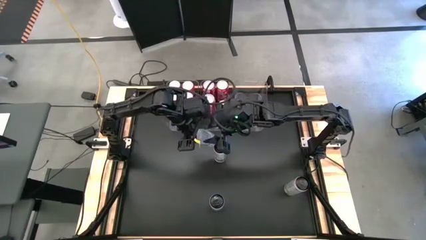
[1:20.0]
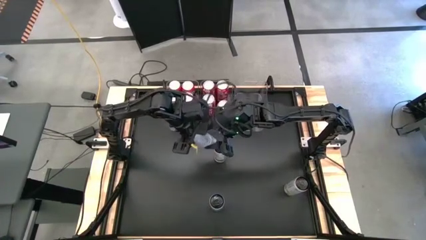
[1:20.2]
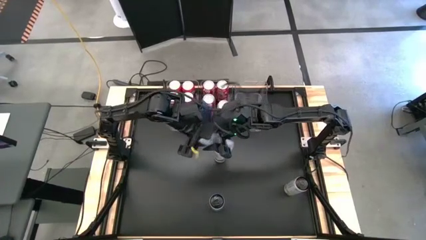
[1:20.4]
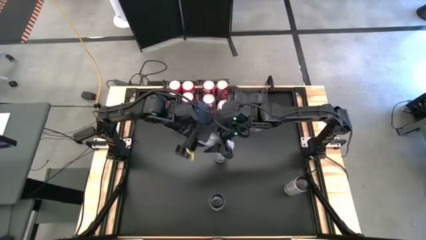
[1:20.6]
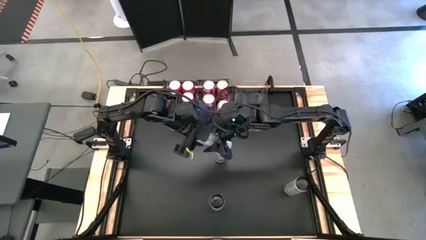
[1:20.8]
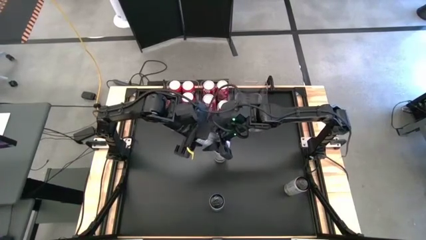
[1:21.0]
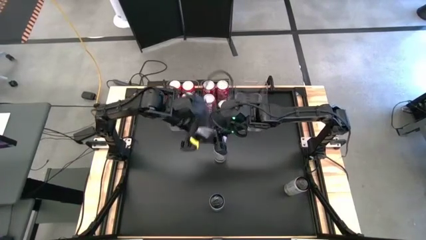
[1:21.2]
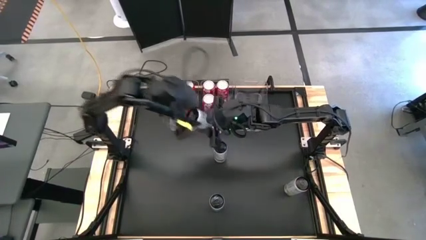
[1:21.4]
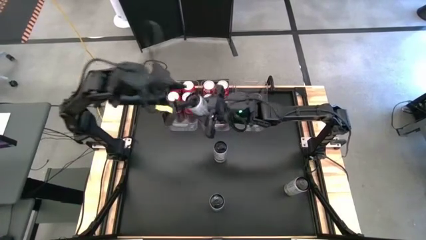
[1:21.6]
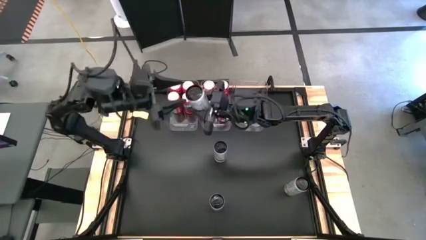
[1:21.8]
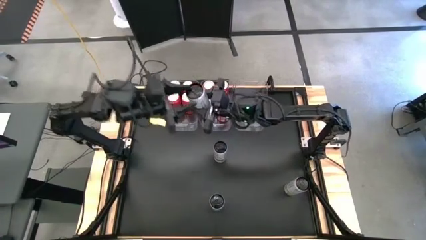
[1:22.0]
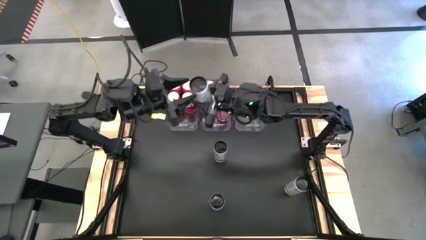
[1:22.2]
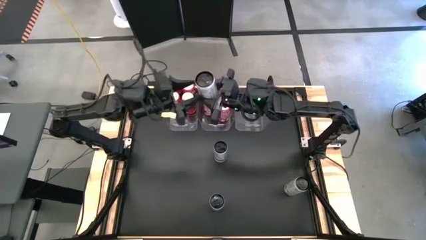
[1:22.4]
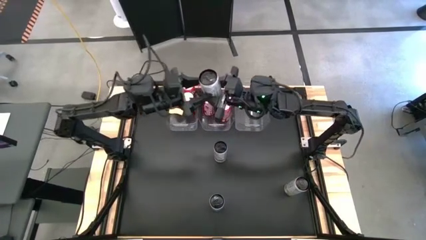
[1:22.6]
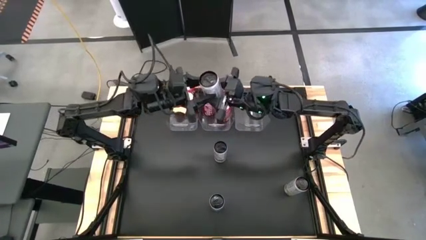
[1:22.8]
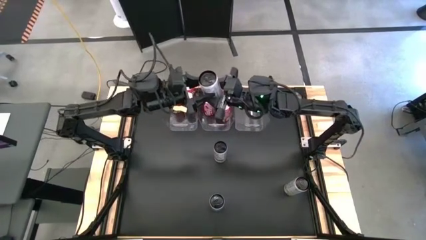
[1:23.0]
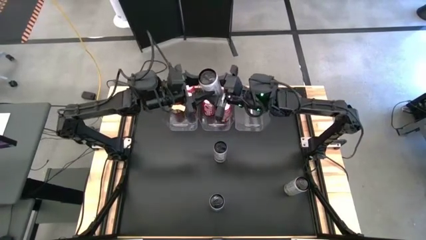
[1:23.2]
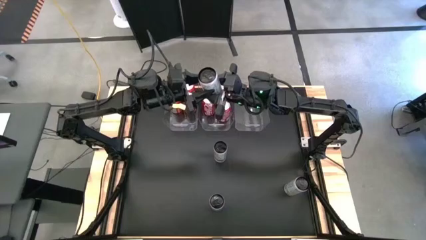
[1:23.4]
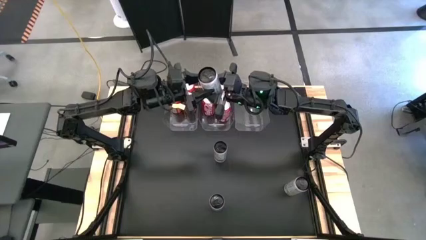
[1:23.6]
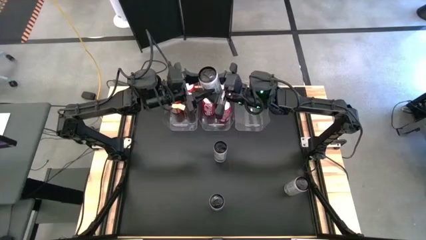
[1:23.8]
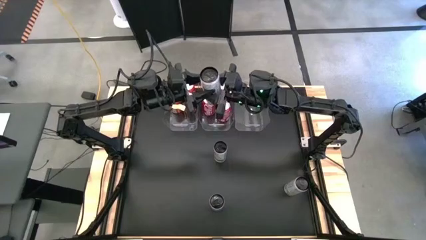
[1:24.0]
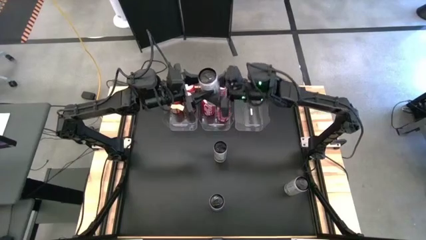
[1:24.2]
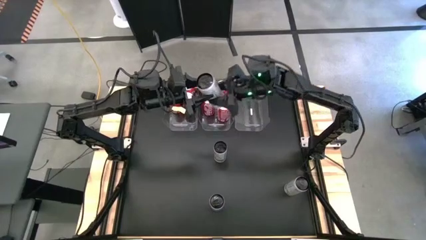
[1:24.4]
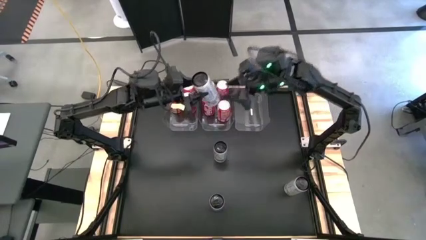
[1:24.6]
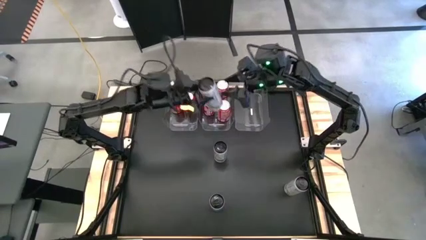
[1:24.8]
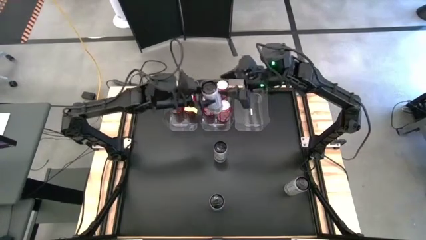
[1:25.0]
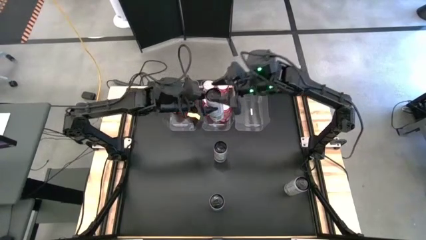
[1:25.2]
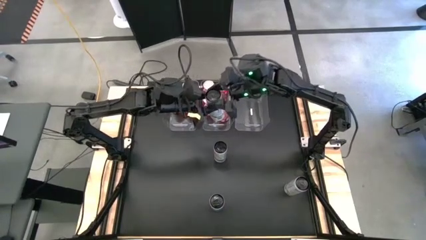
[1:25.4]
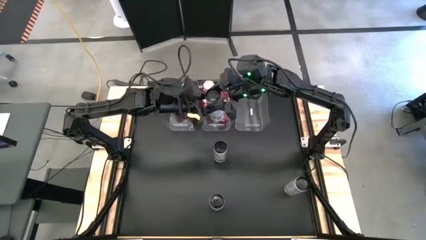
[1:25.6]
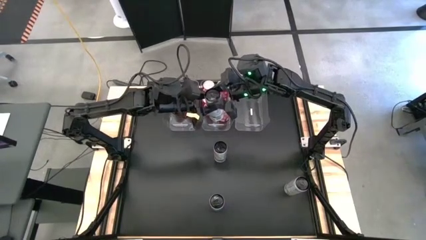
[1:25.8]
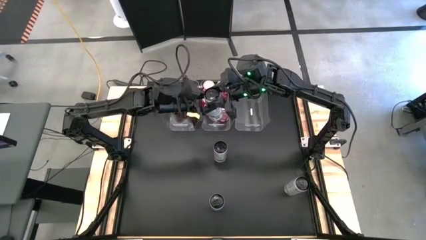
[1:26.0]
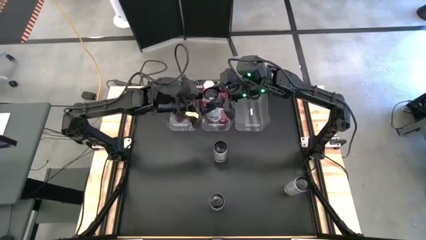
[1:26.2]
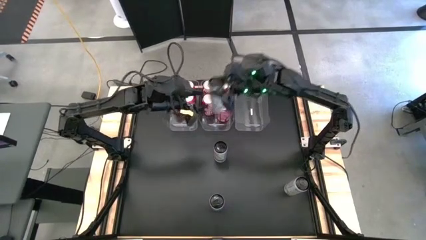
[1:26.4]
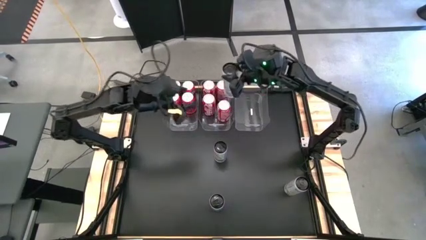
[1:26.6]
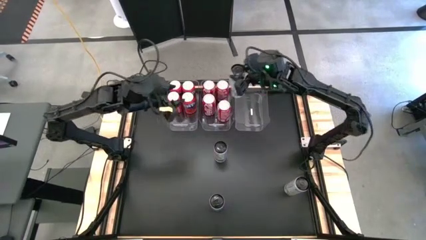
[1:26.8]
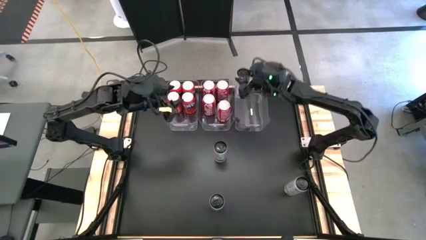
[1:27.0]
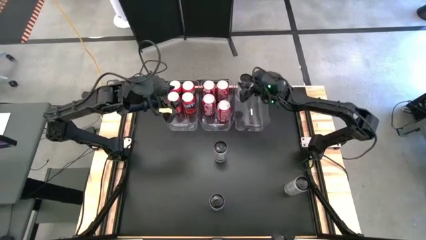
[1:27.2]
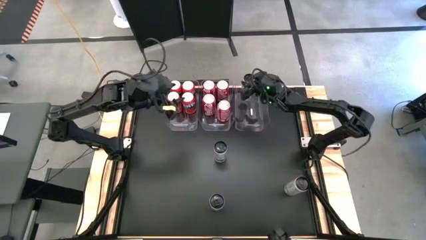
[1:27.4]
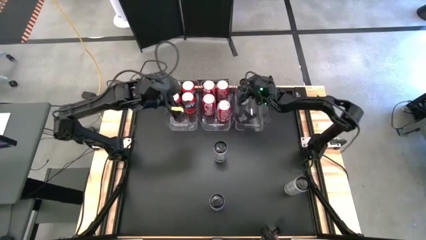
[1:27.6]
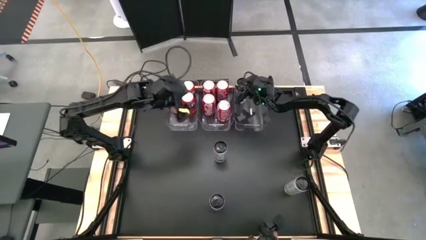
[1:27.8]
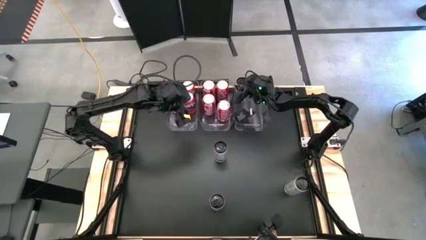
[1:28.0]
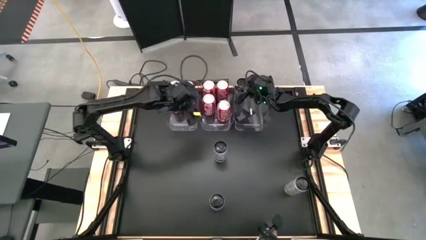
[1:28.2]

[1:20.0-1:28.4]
Task: Sort soda cans
Put the bottom left white yellow soda can into the right transparent bin

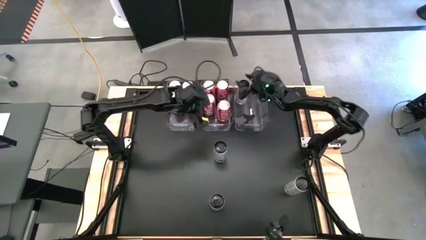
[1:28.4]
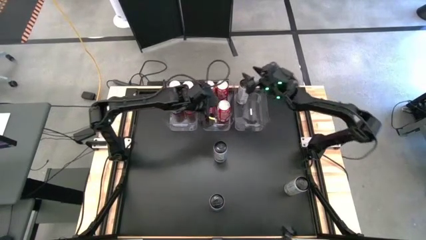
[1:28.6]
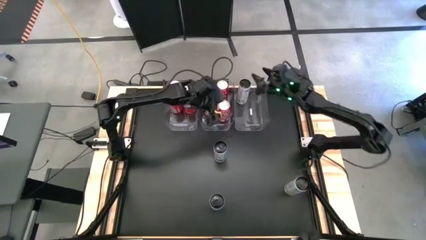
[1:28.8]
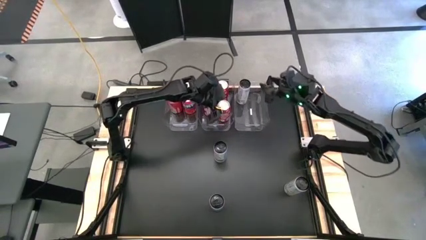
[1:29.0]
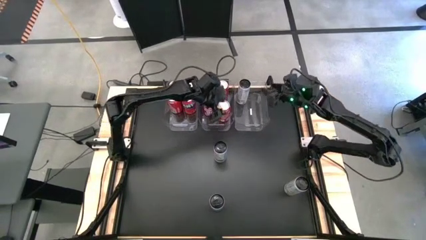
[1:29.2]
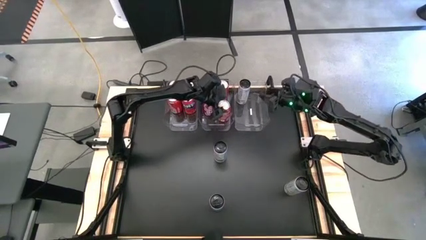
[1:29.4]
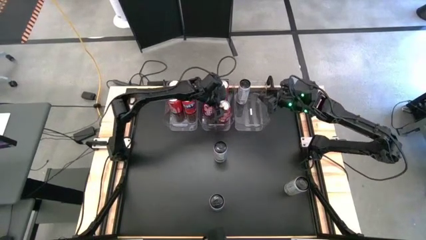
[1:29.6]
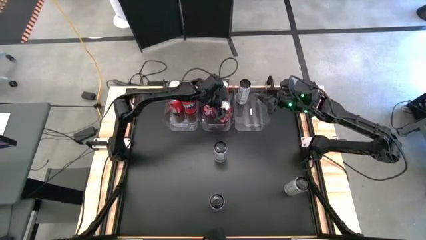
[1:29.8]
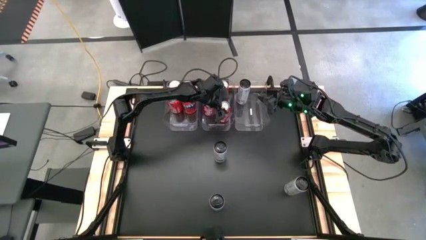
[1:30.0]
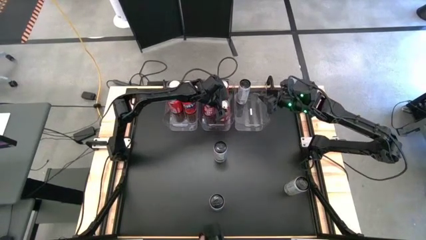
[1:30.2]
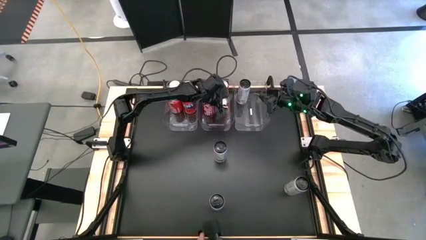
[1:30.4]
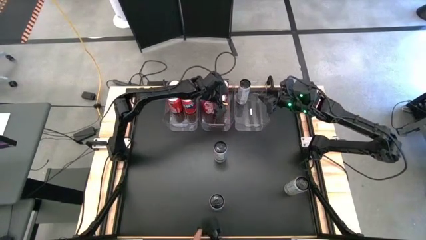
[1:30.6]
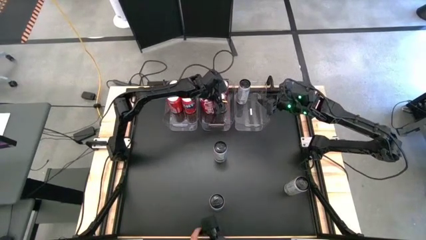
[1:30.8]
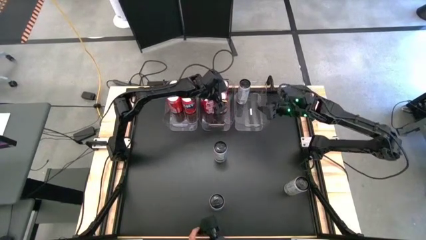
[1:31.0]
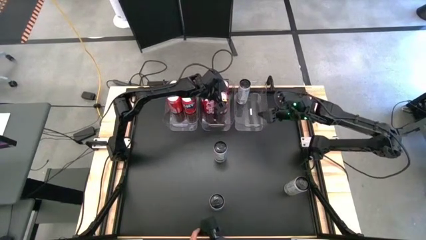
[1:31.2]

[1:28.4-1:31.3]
Adjust the red soda can

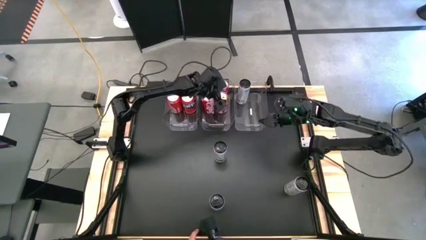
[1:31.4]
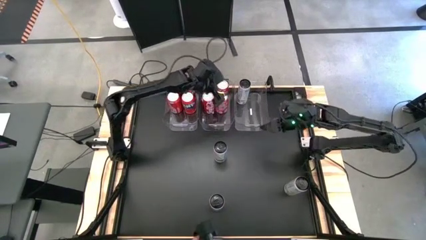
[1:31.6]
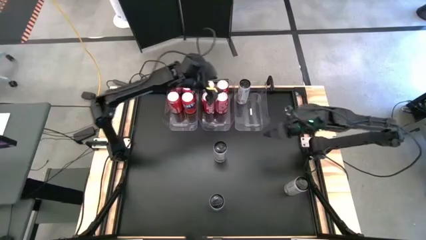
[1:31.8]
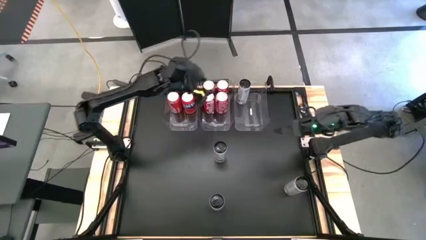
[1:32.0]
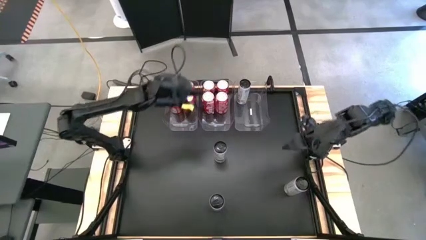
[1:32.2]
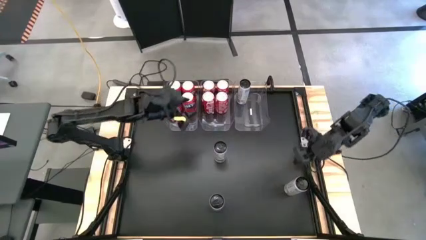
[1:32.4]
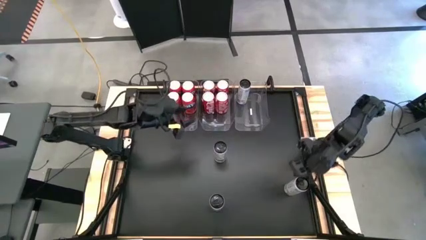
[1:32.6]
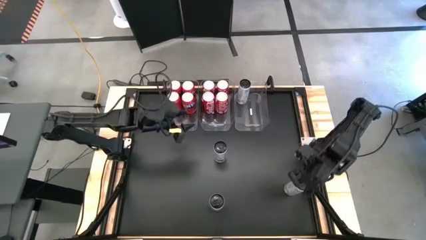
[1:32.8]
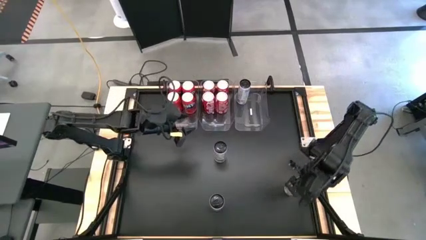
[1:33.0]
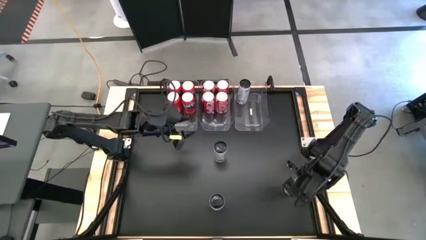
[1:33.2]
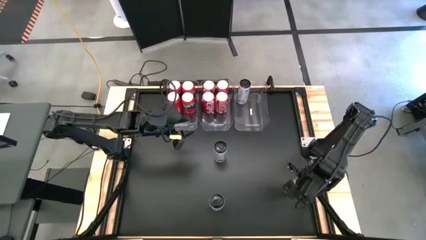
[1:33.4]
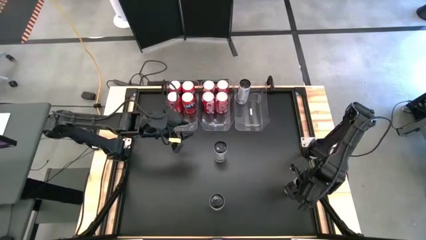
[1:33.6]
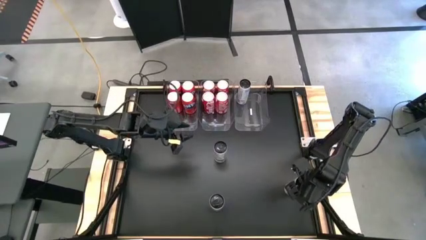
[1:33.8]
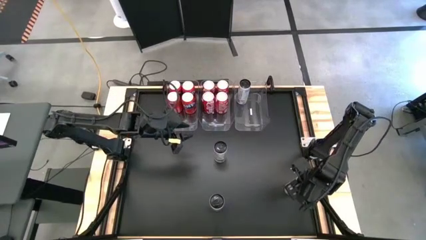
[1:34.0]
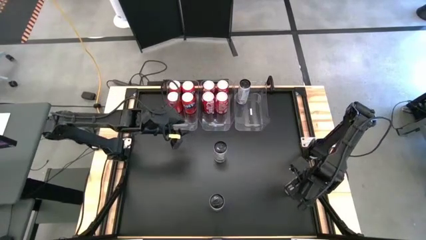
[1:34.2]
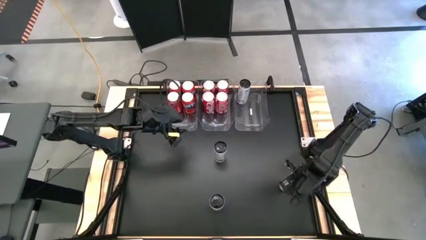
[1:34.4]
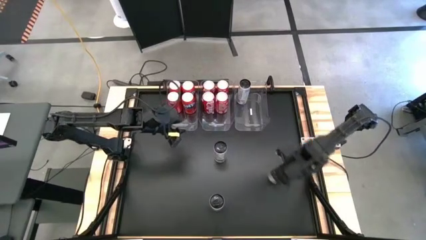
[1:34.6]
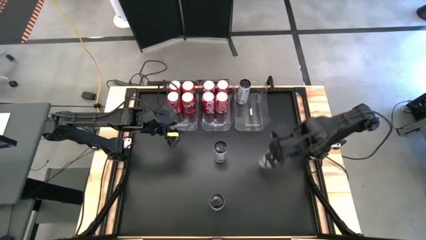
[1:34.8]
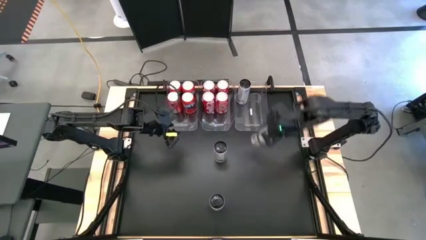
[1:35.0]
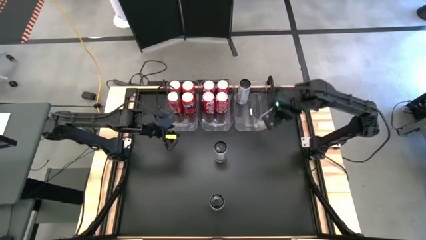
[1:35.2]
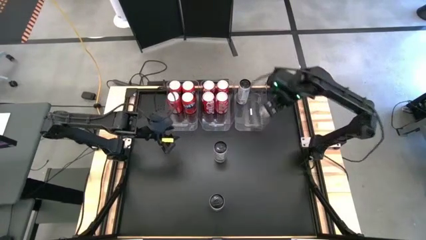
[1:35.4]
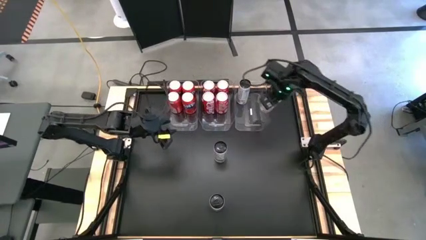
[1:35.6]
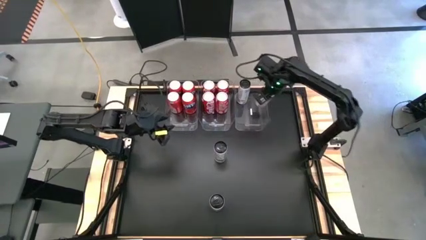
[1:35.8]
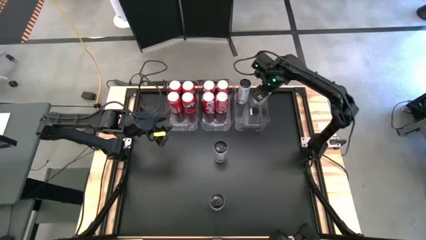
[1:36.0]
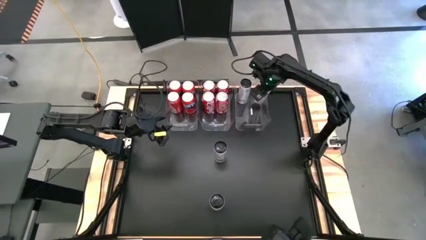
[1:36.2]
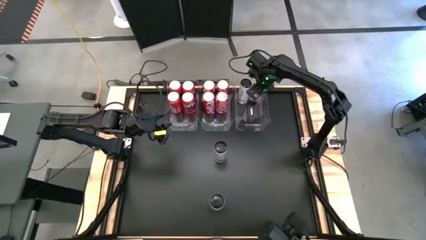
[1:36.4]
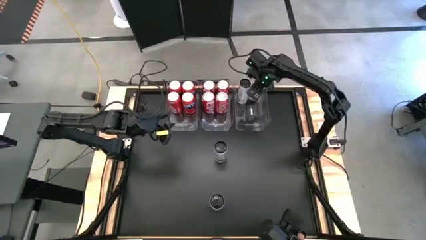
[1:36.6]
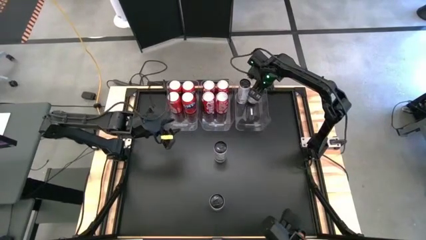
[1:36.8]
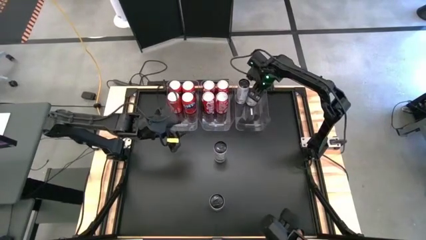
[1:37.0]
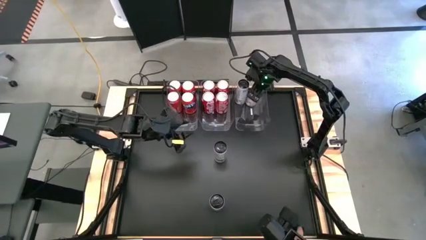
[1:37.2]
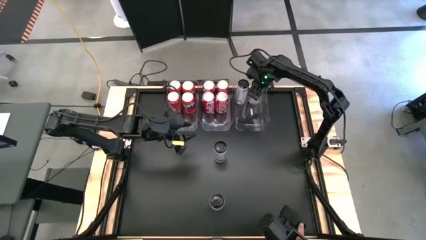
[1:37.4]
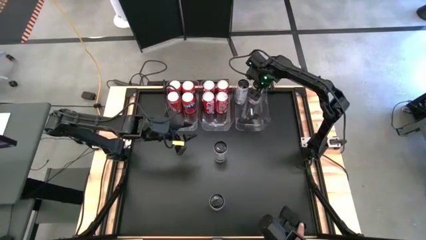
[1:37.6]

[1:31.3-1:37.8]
Put the bottom right white yellow soda can into the right transparent bin
